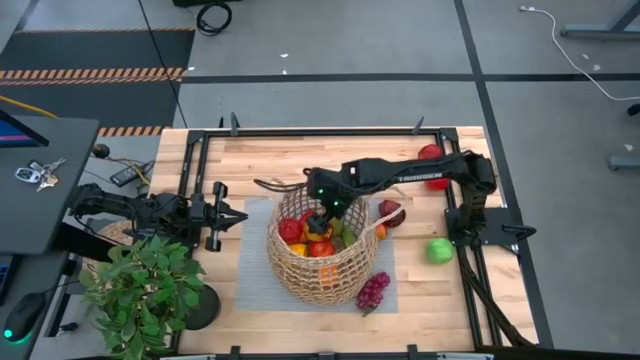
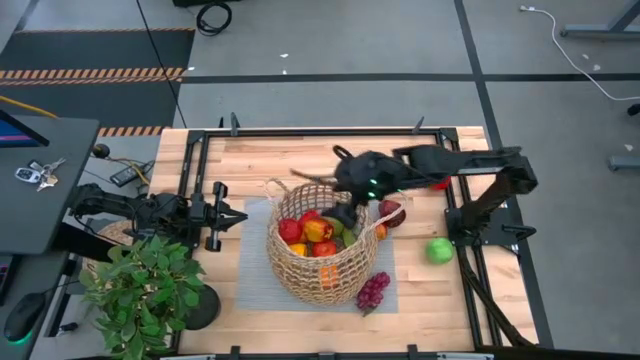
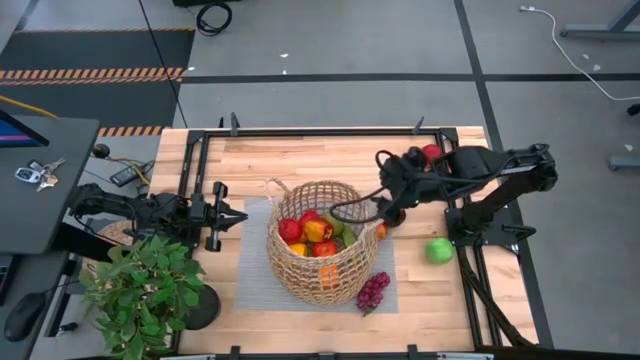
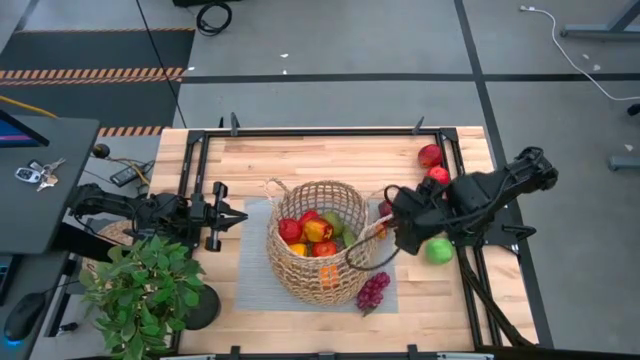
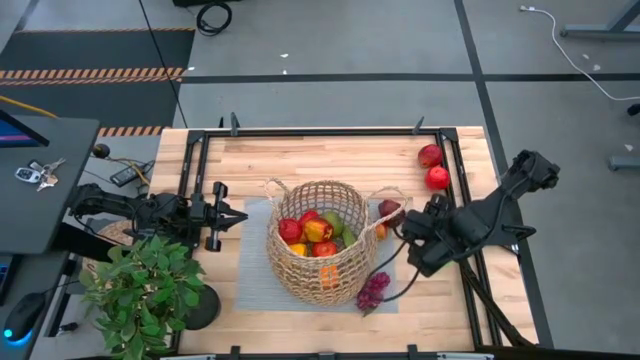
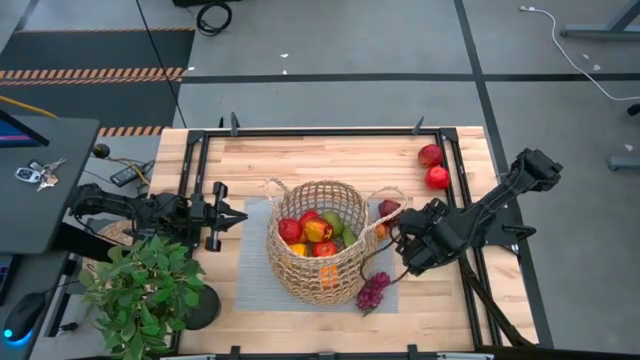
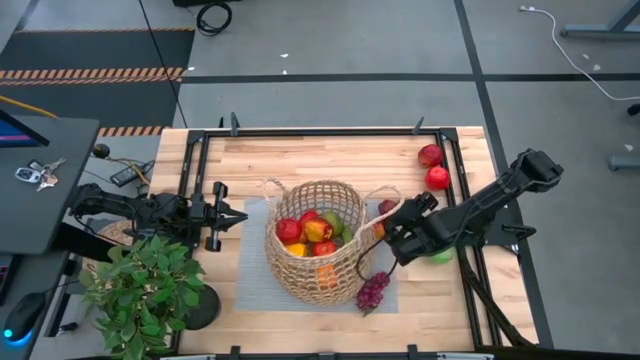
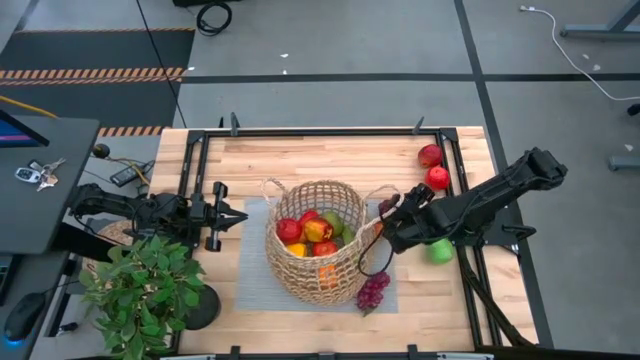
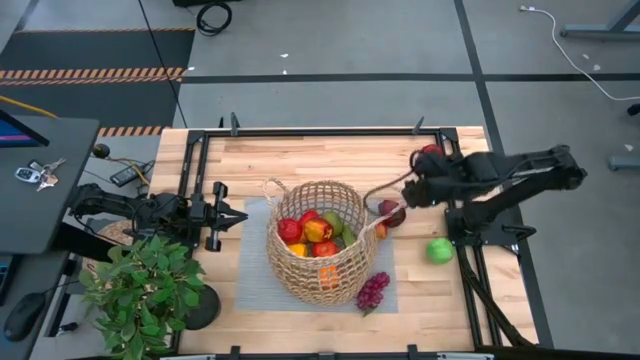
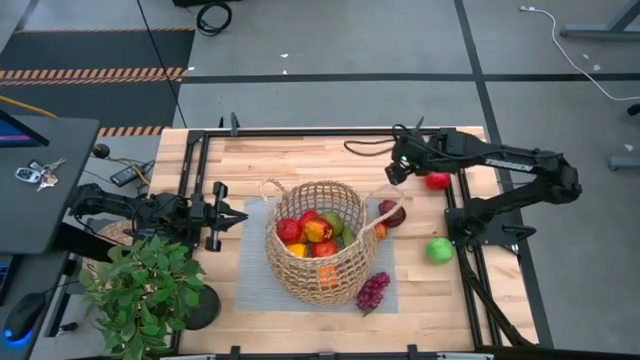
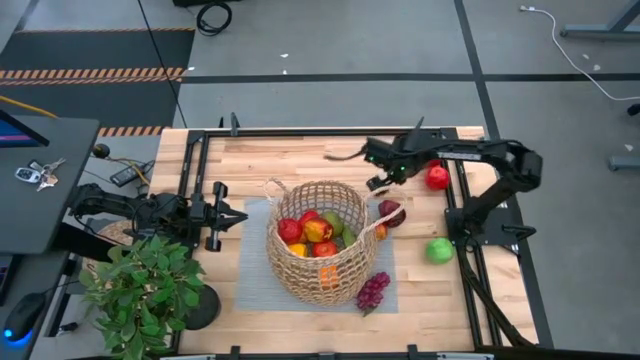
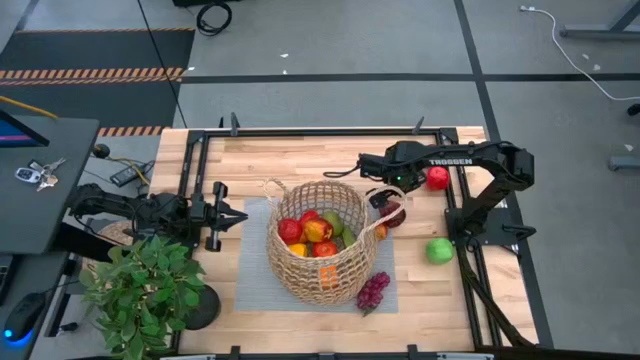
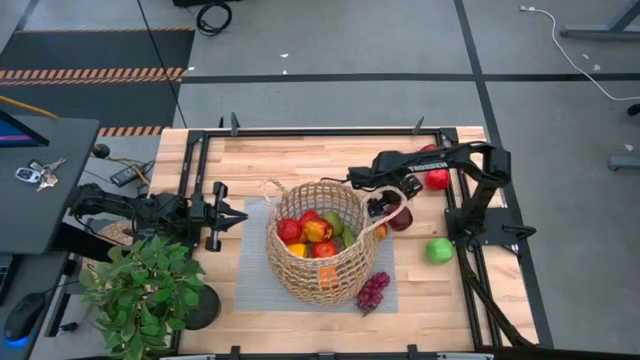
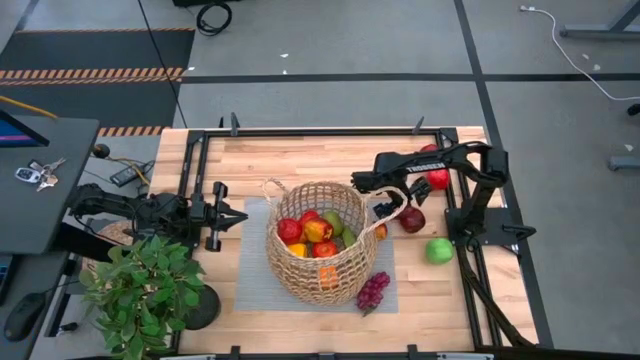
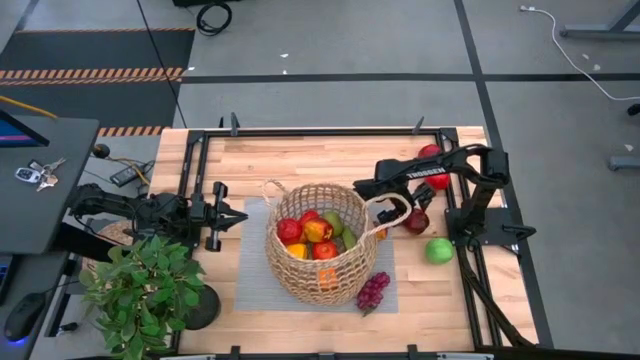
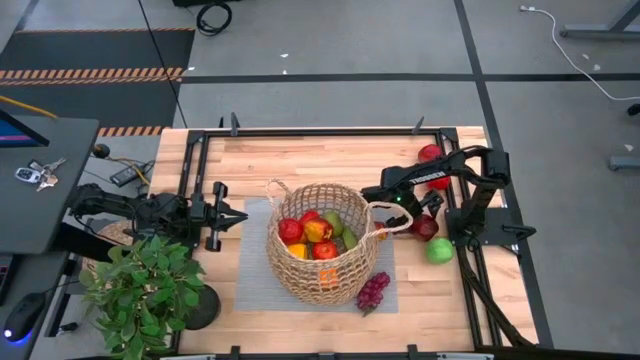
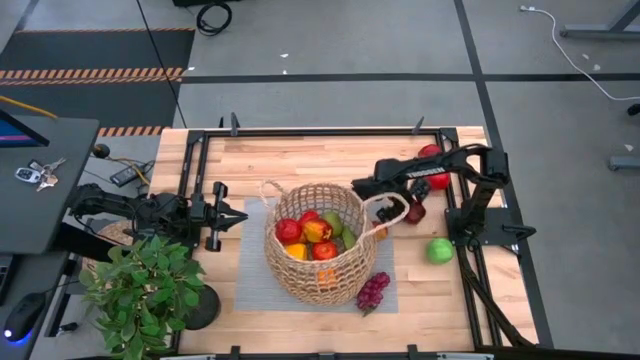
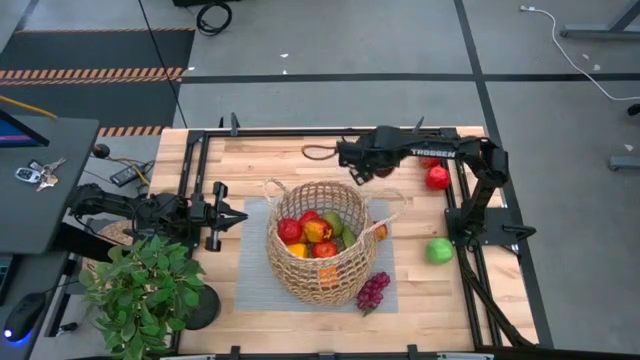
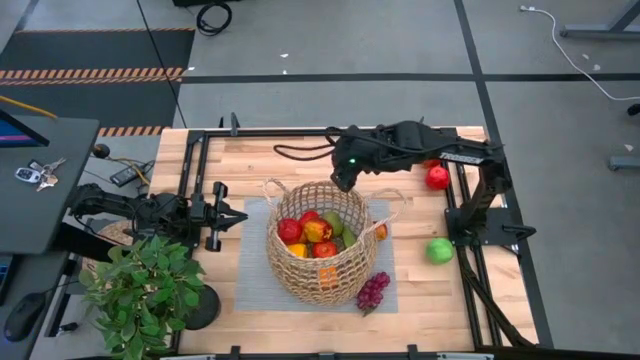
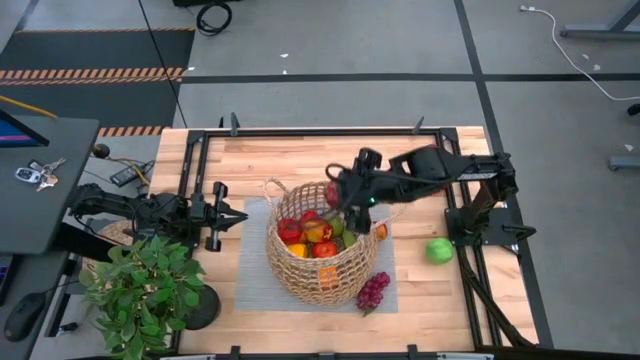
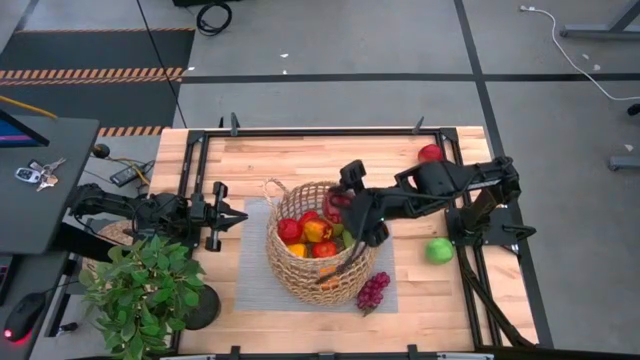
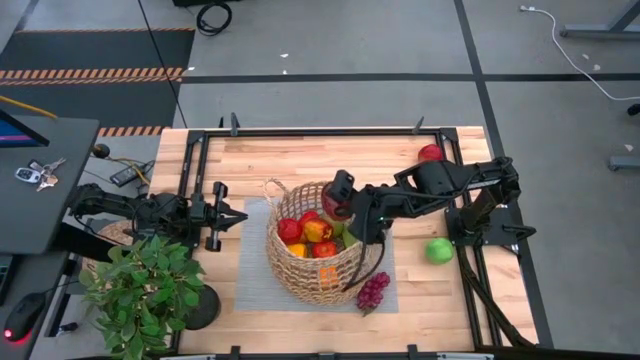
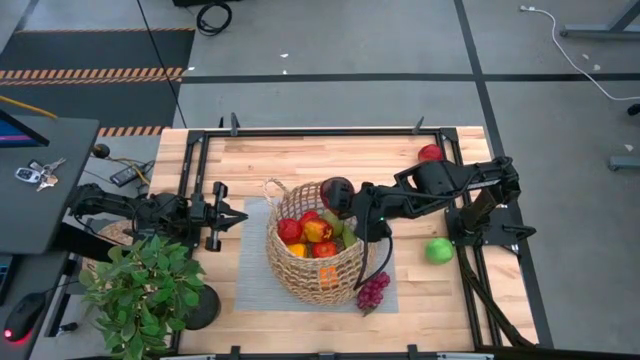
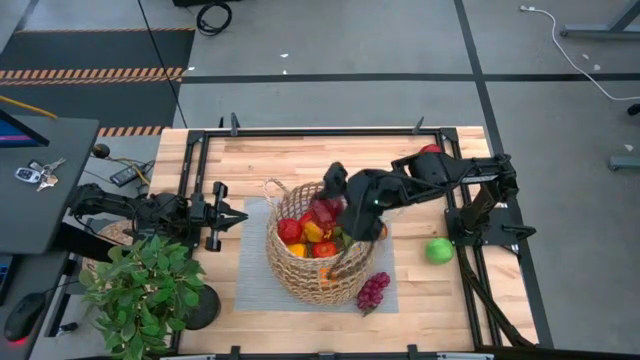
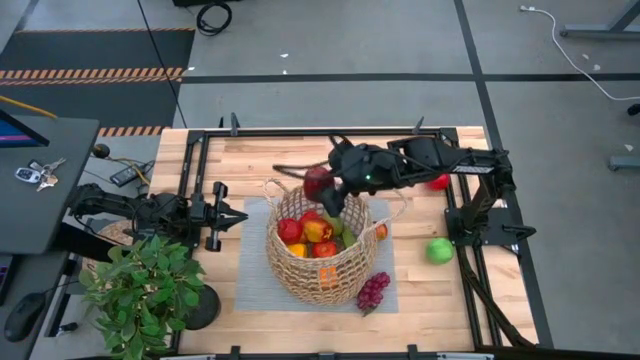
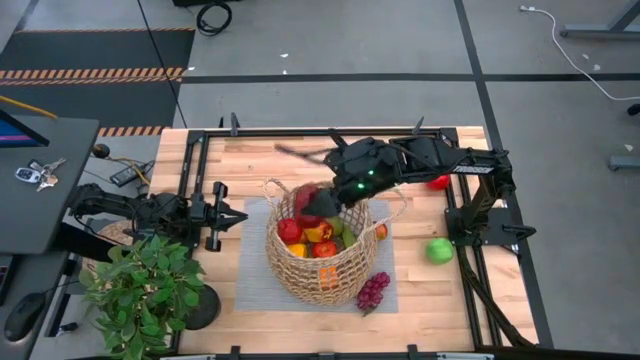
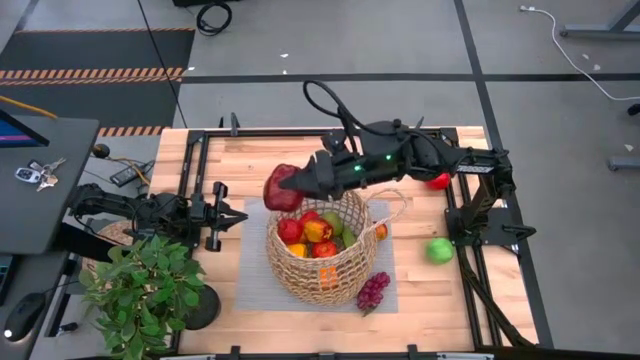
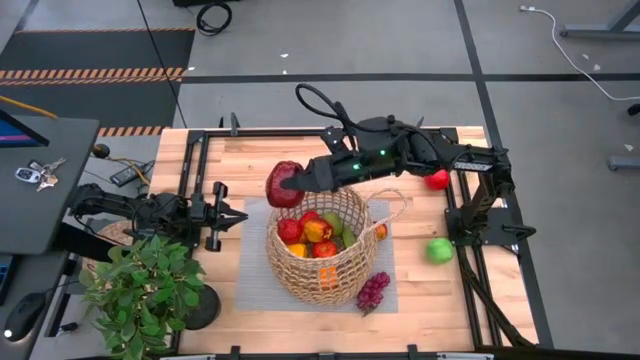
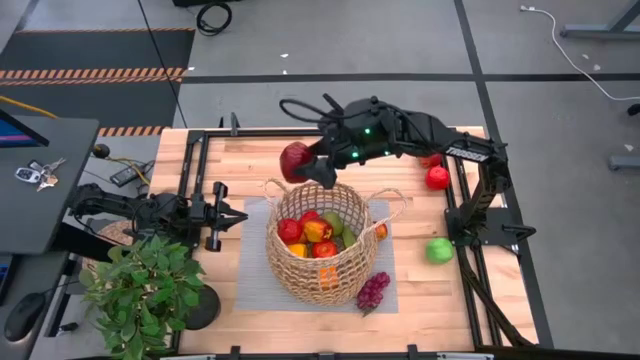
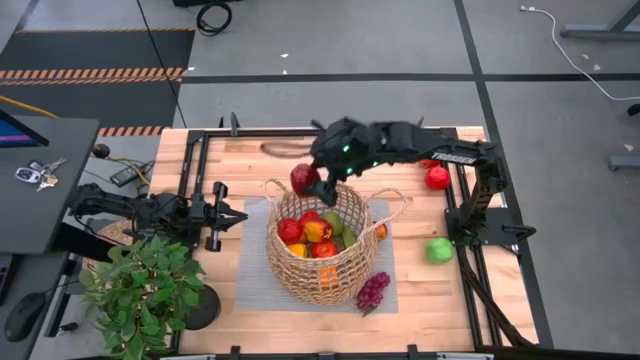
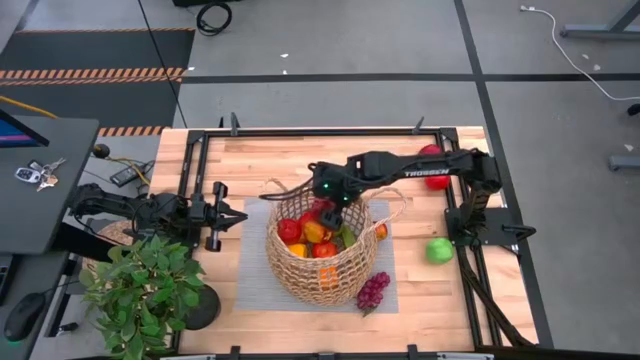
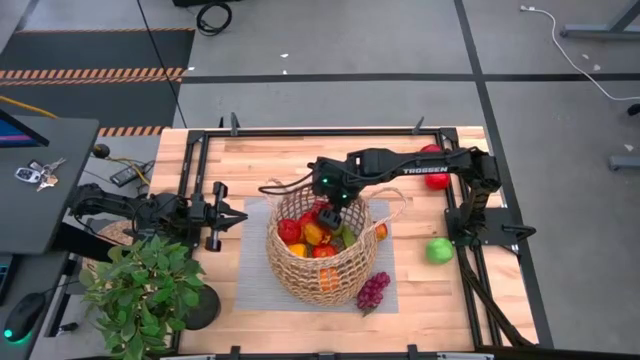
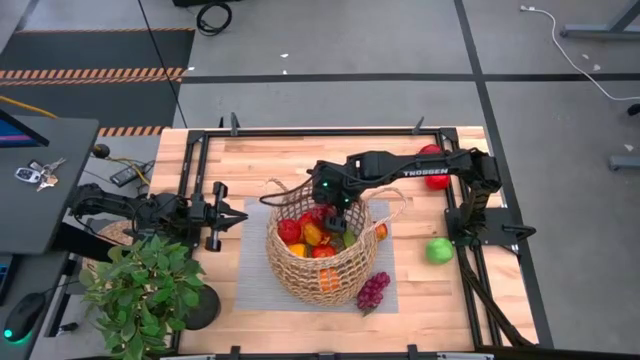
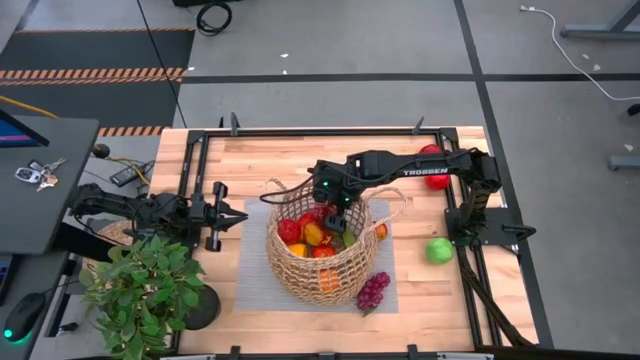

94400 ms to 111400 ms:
Task: Build produce basket
Put the dark red apple into the brown basket

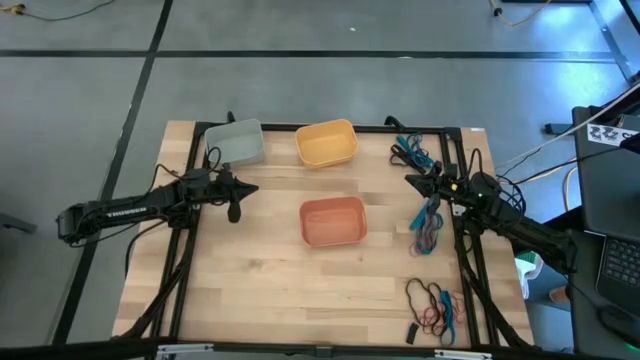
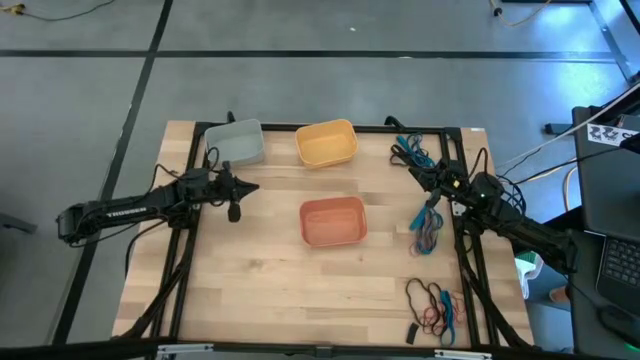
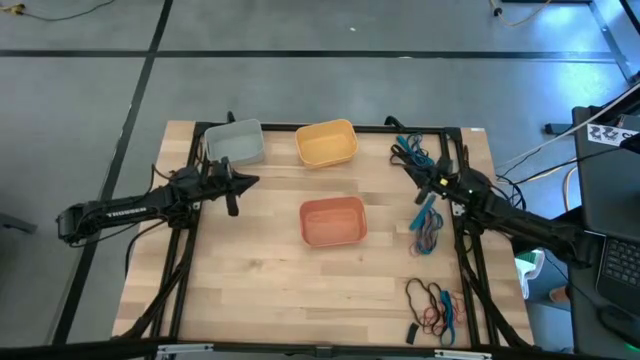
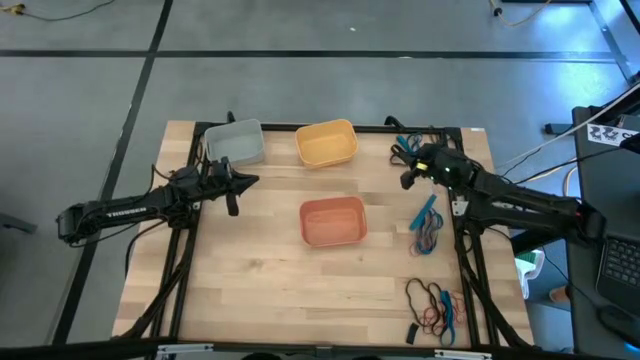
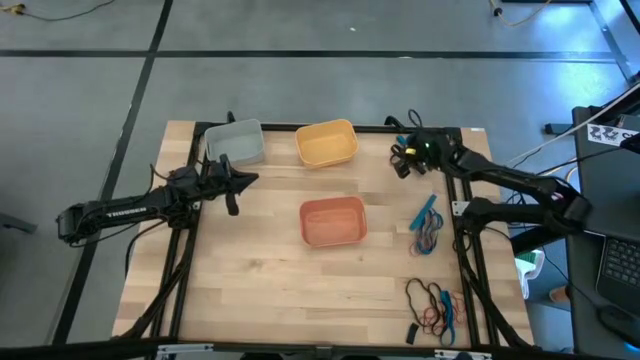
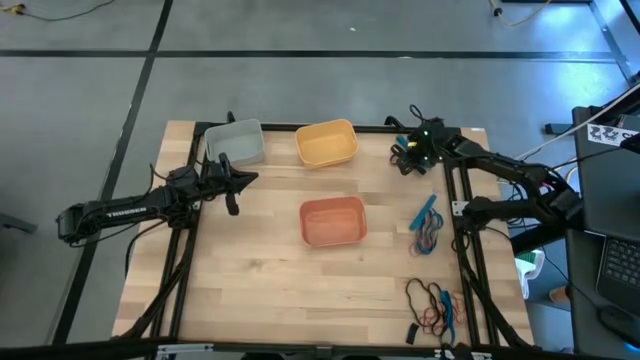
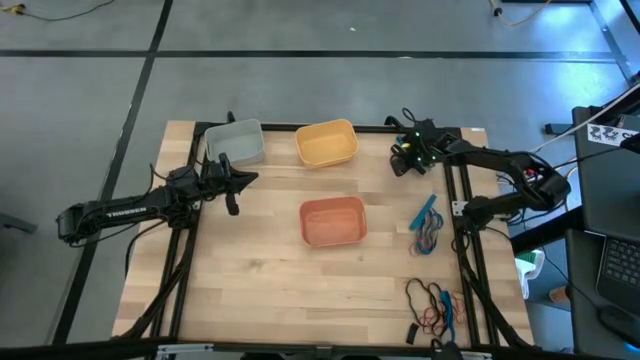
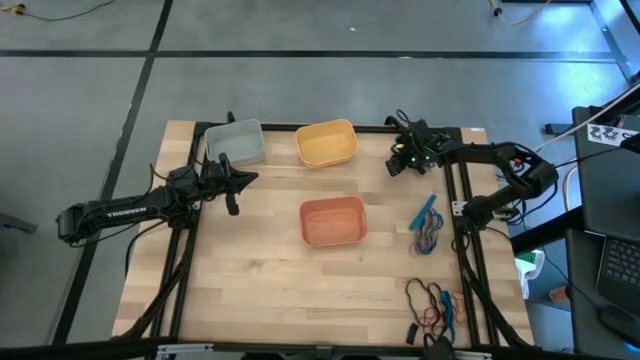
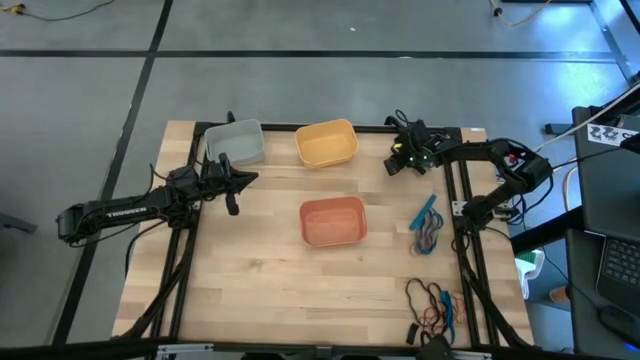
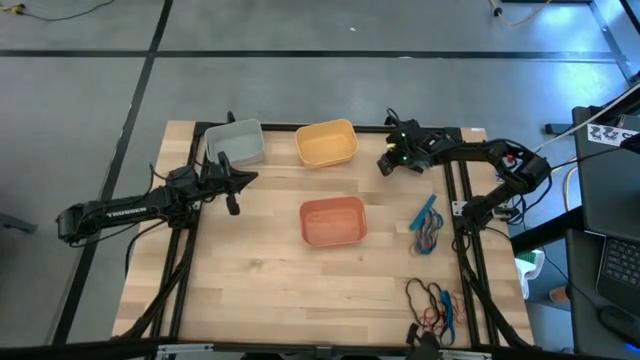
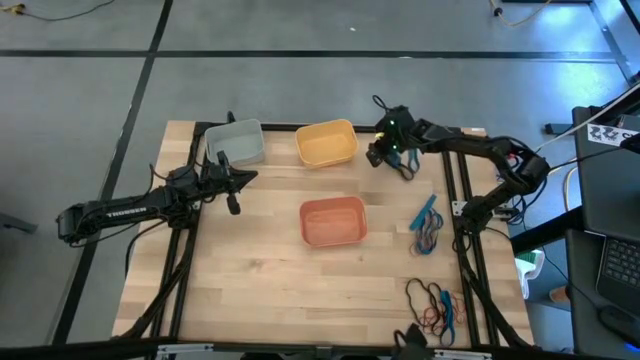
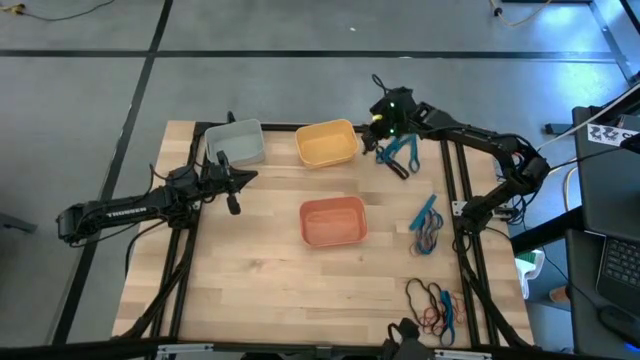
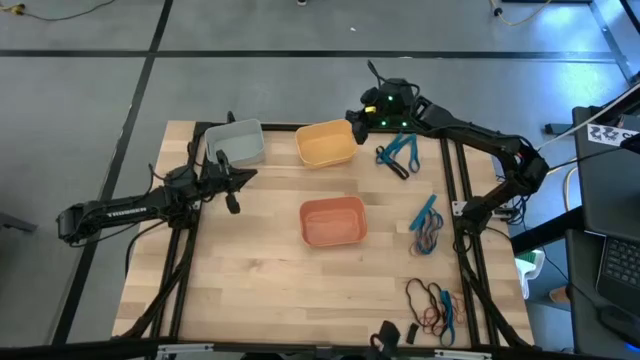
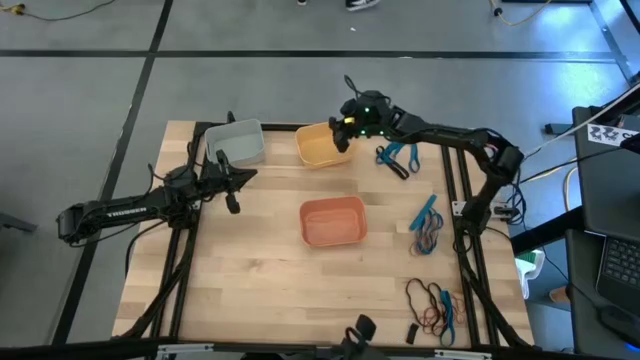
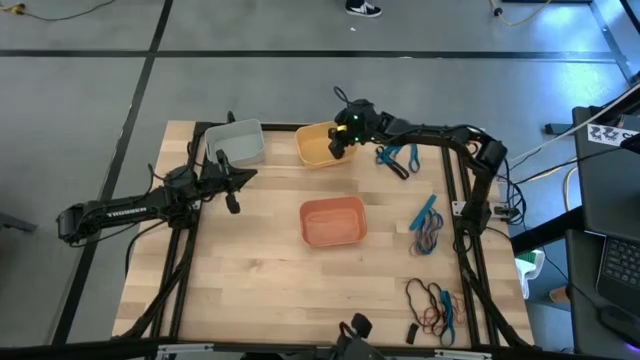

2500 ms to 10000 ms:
Task: Sort rubber bands into baskets
Put the black rubber band into the yellow bin
